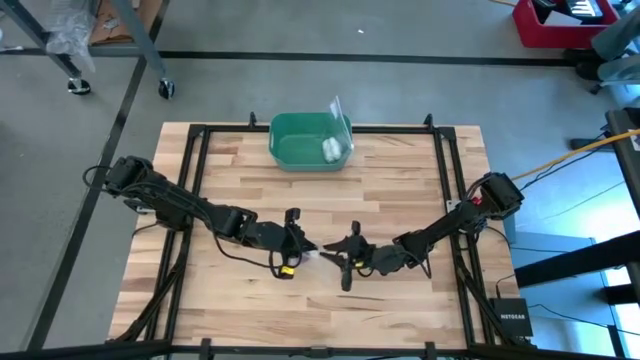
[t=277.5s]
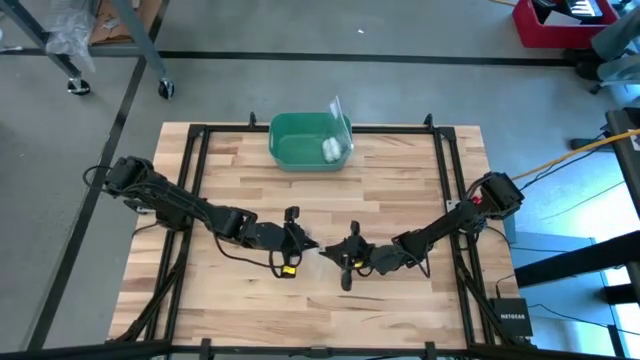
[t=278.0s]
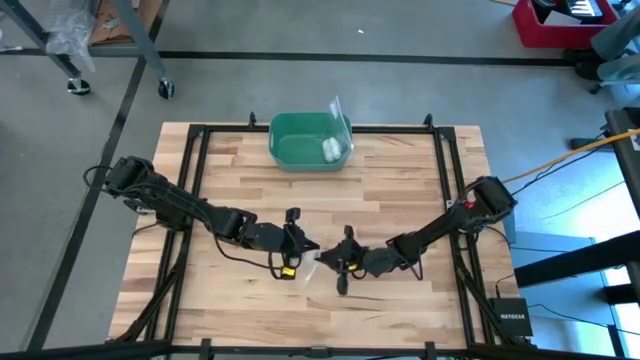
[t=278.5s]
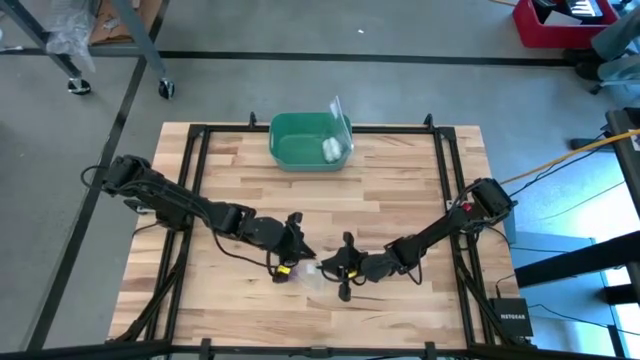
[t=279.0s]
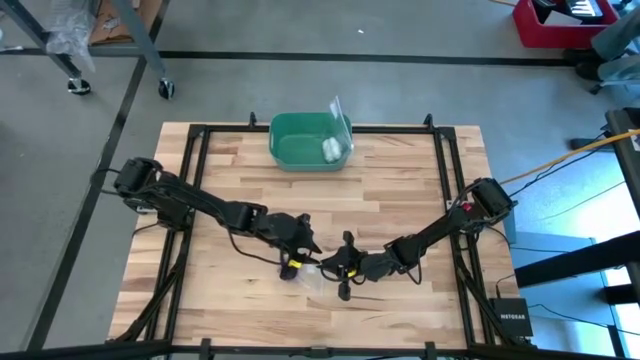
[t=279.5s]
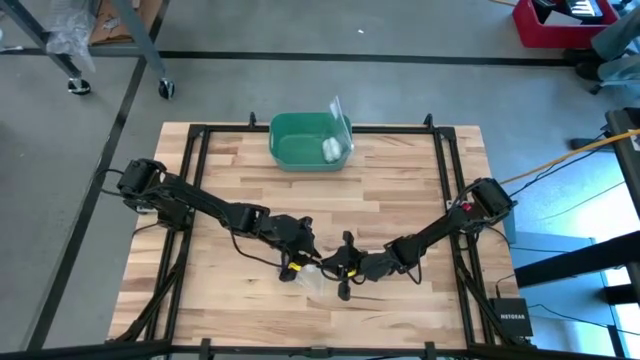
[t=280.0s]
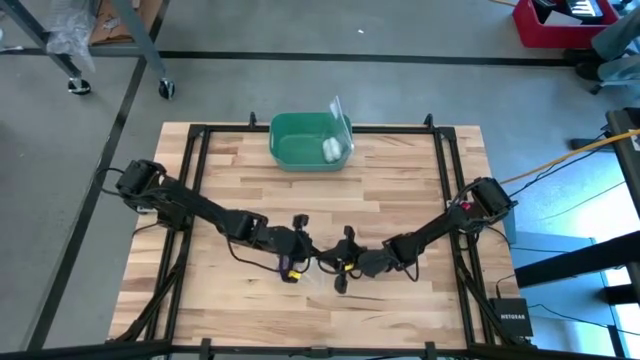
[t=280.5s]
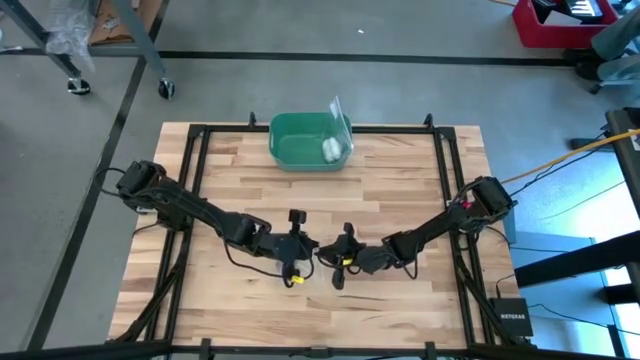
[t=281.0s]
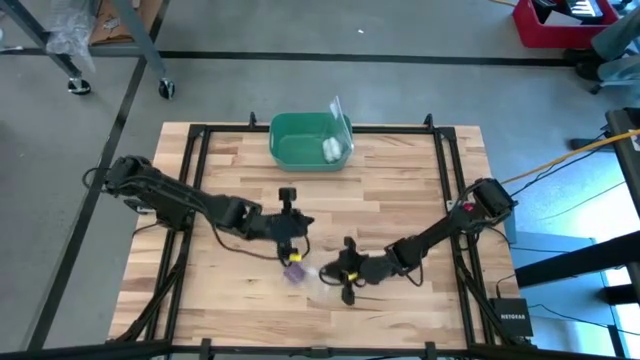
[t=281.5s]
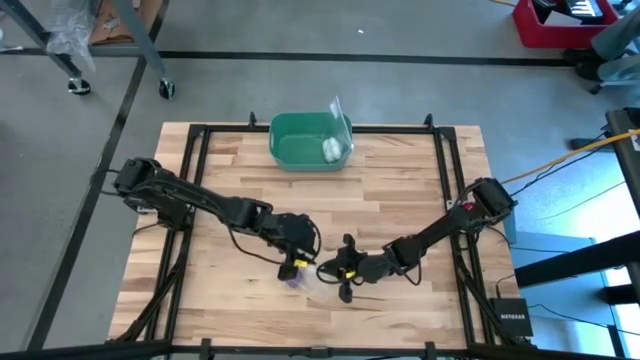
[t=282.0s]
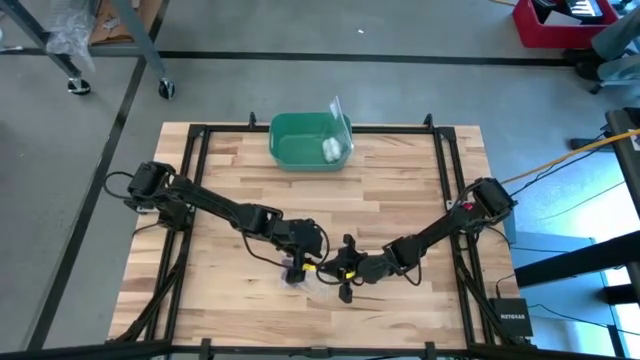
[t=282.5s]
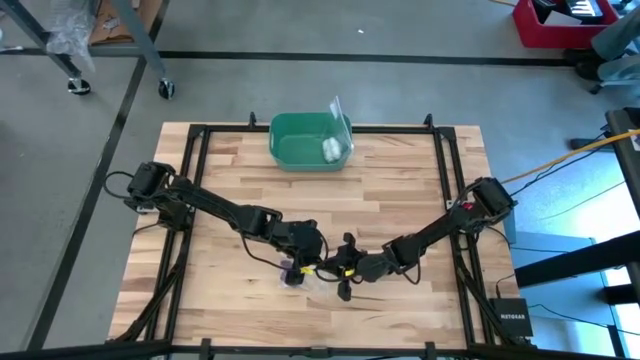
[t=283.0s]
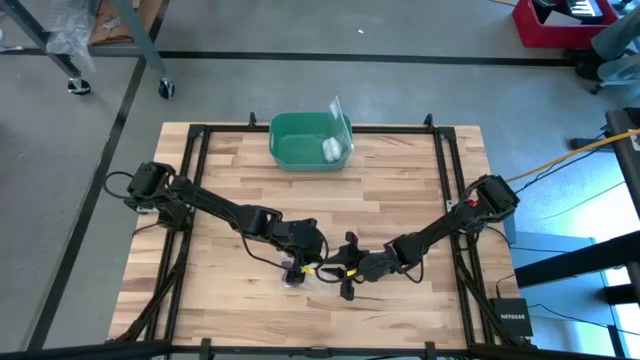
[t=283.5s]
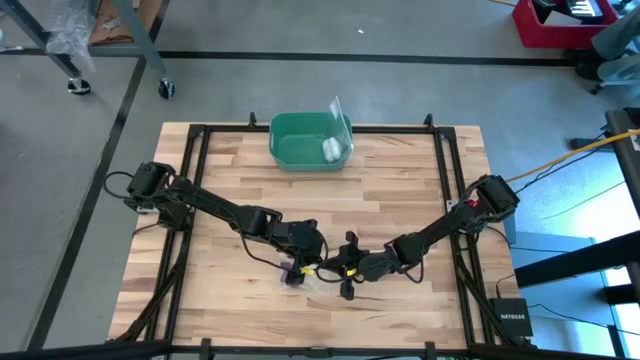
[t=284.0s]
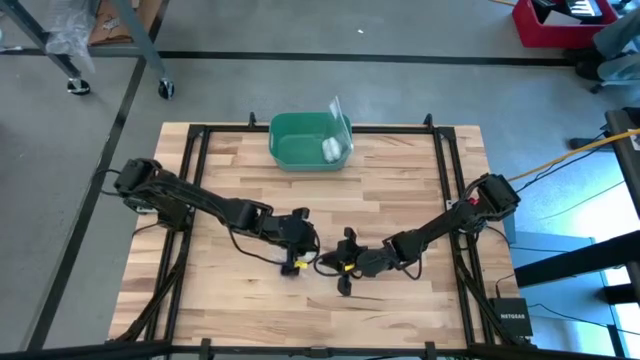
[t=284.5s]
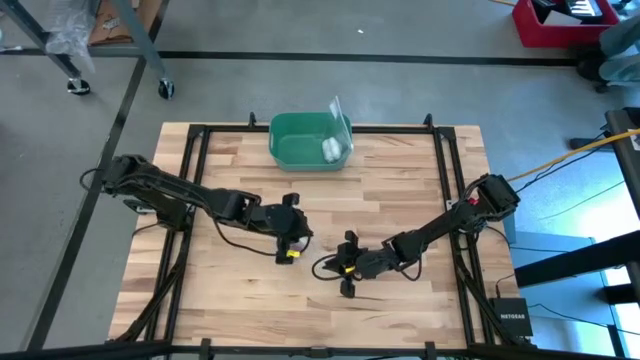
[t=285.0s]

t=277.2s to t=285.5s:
Task: Roll bandage
Close the zip bag

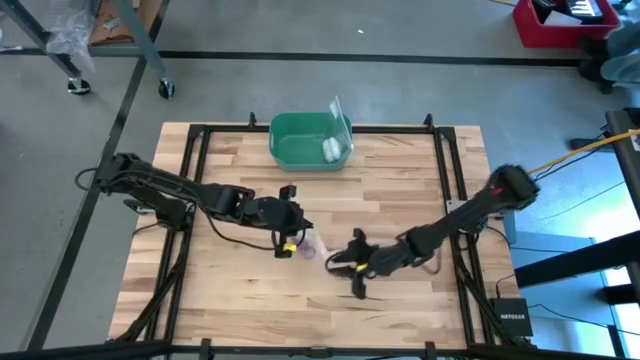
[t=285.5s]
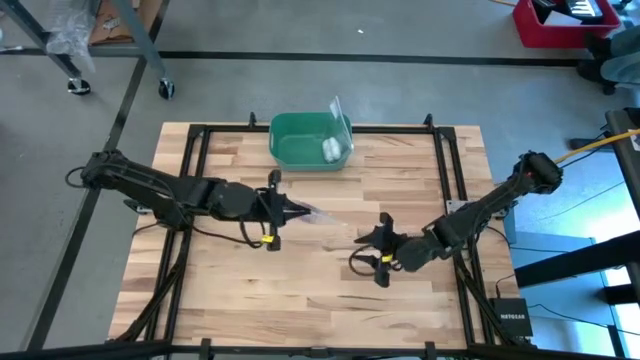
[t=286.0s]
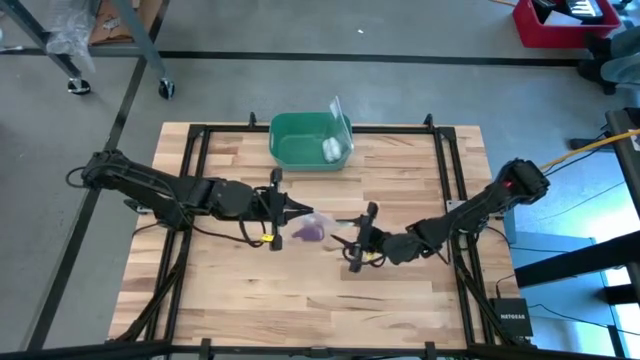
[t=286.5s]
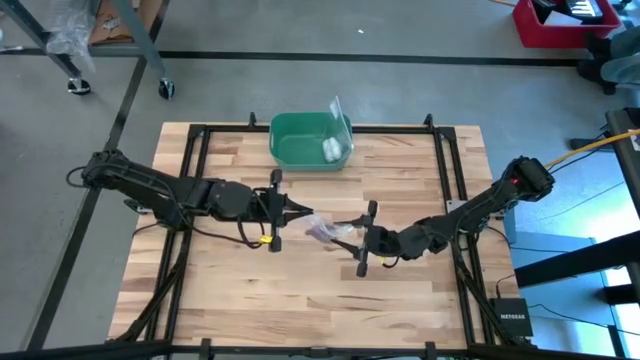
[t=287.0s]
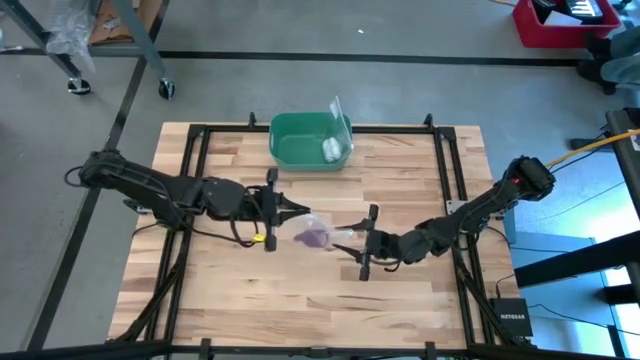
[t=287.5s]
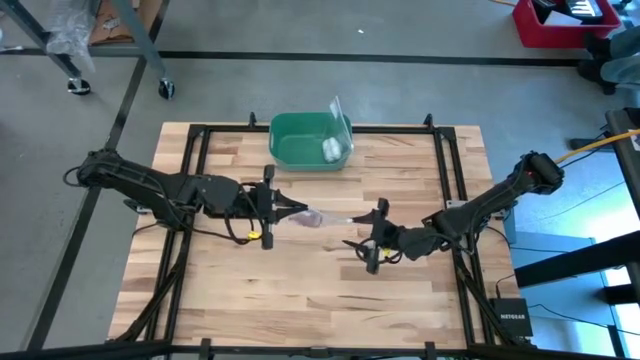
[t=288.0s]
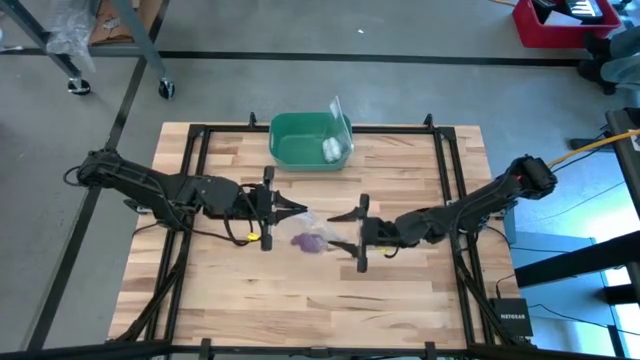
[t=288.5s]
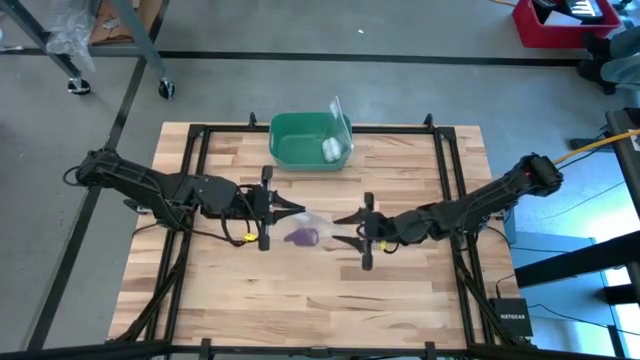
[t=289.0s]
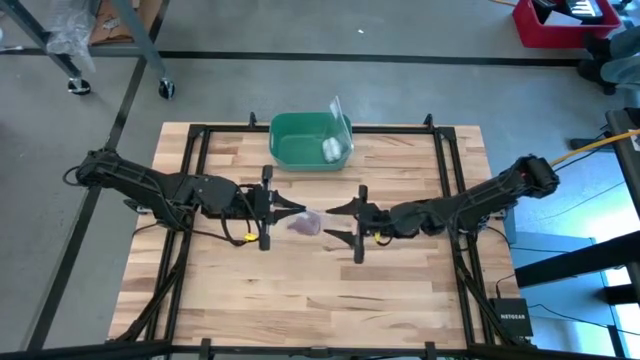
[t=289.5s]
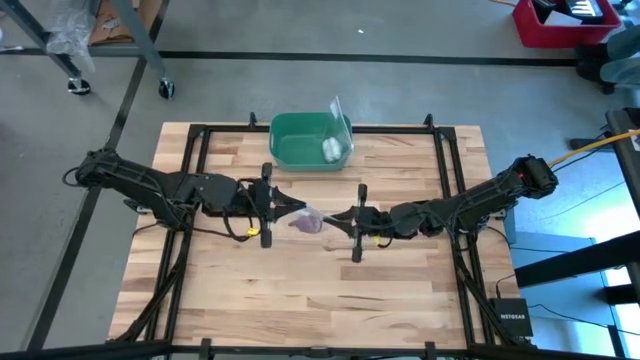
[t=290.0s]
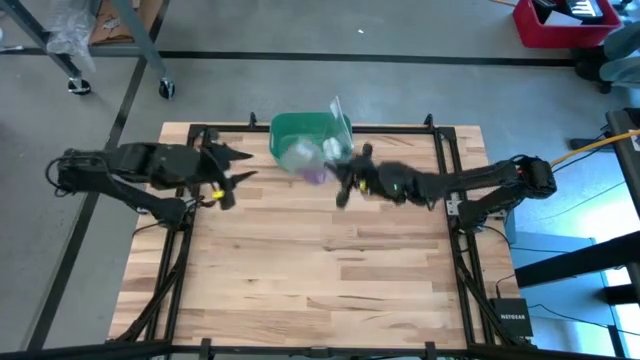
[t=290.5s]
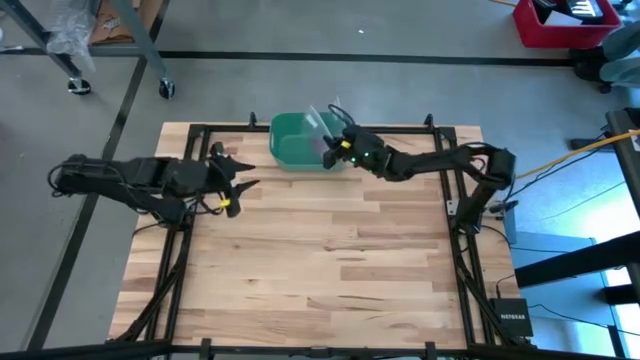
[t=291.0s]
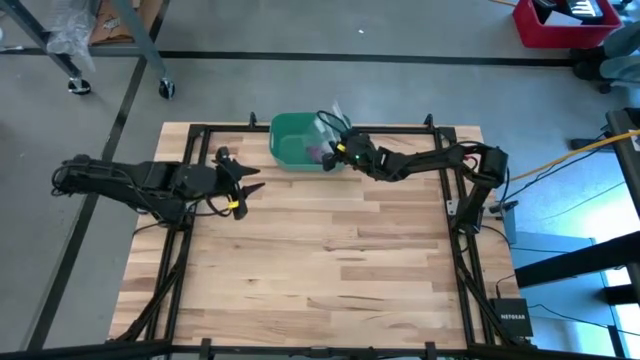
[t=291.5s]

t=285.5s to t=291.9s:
Put the zip bag into the green bin

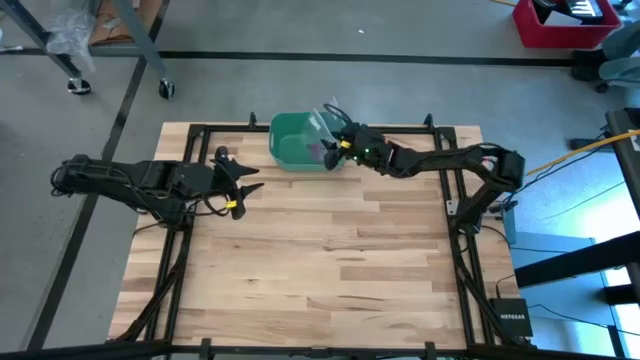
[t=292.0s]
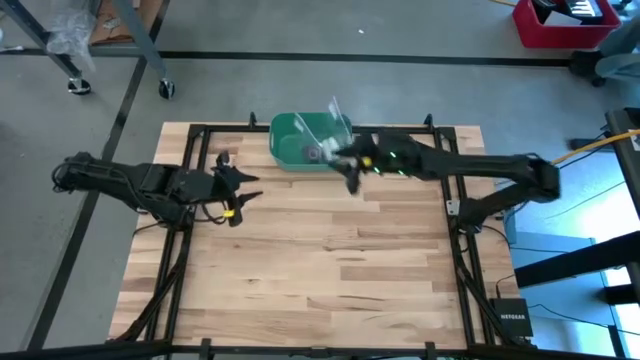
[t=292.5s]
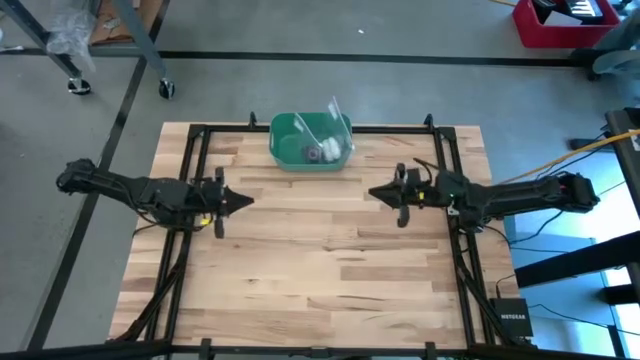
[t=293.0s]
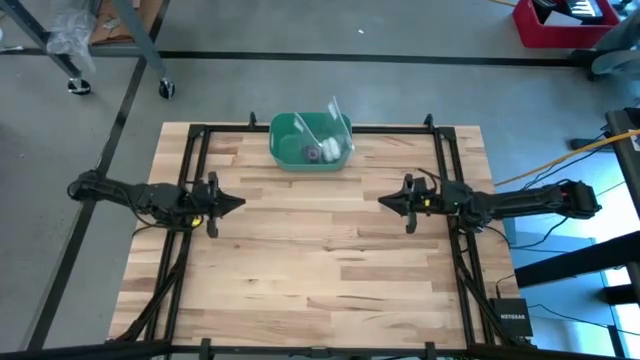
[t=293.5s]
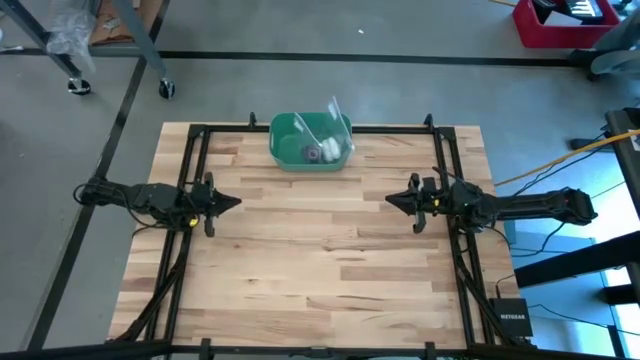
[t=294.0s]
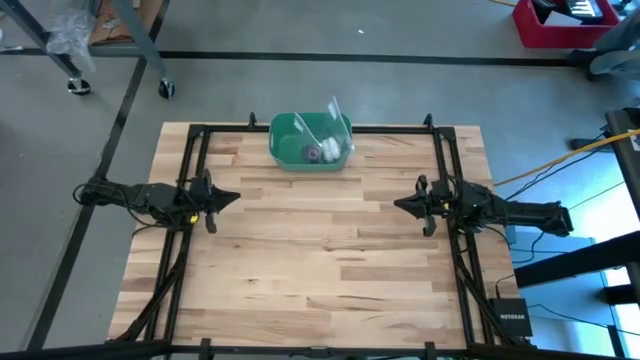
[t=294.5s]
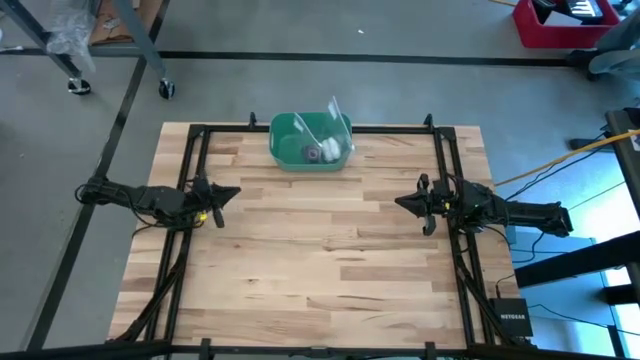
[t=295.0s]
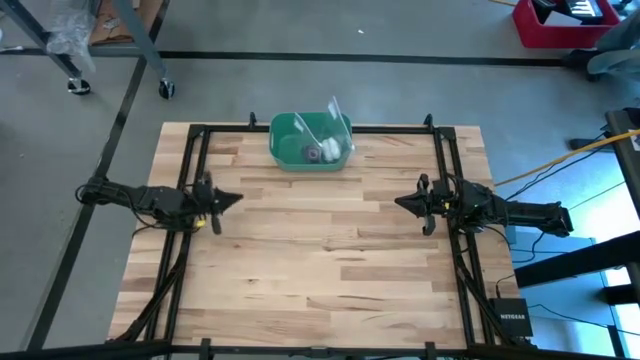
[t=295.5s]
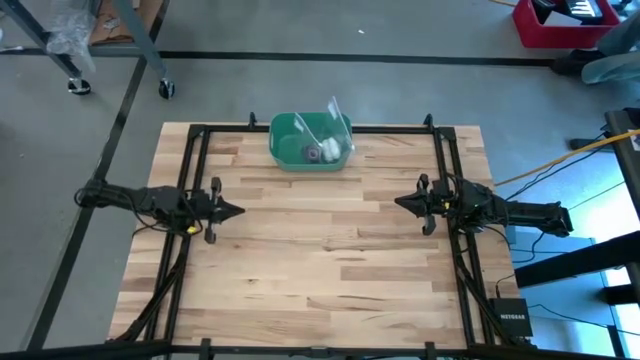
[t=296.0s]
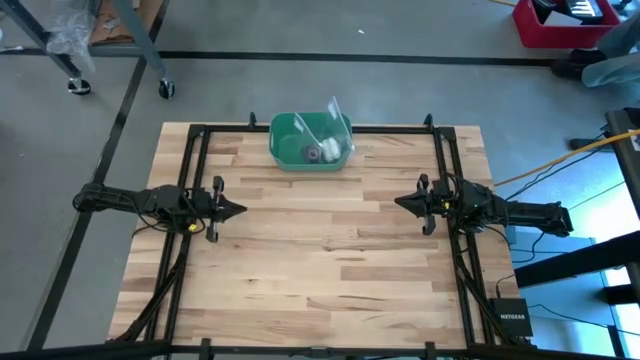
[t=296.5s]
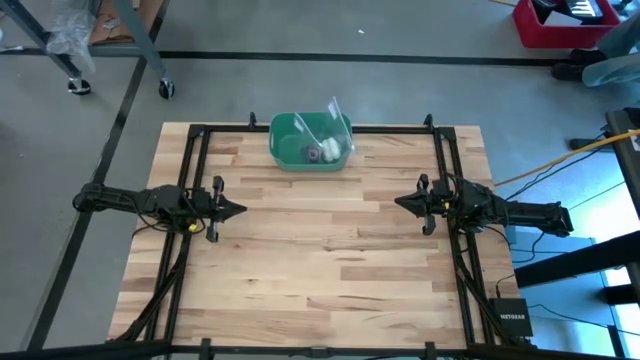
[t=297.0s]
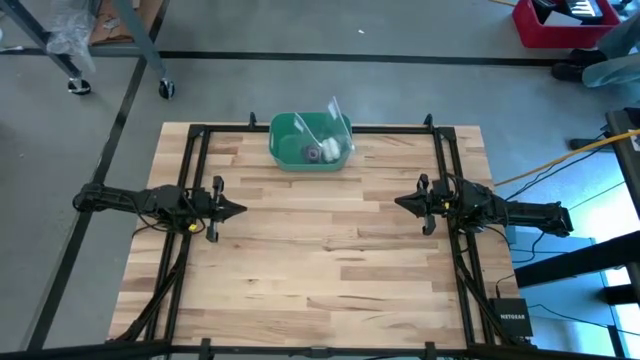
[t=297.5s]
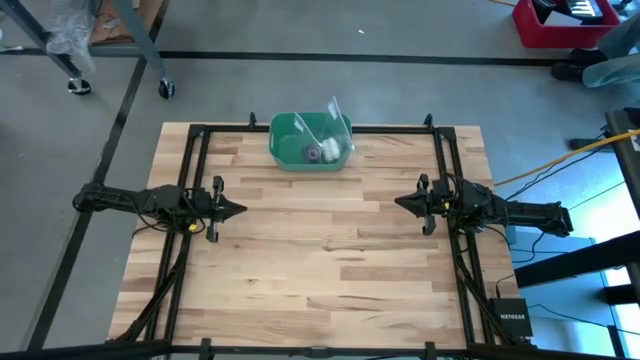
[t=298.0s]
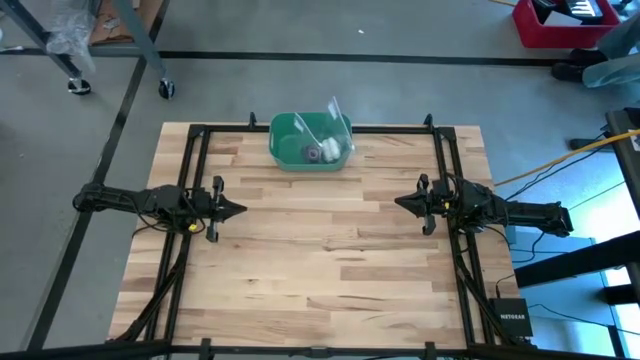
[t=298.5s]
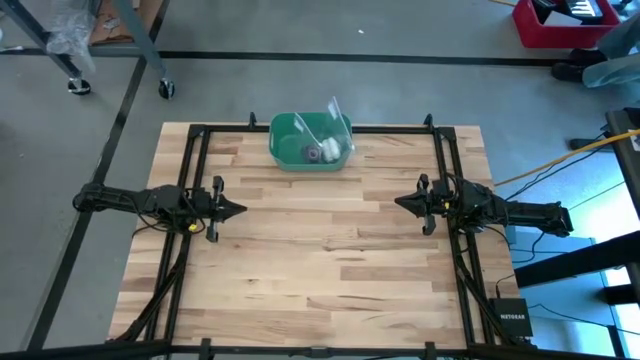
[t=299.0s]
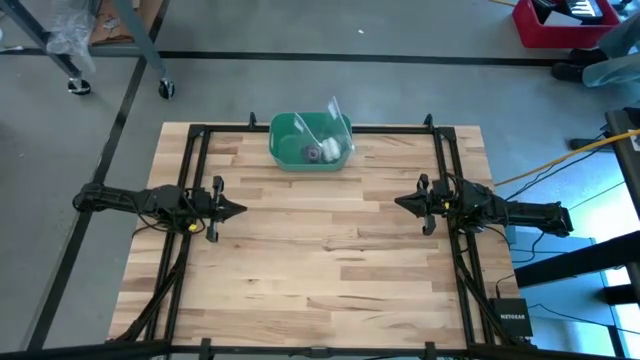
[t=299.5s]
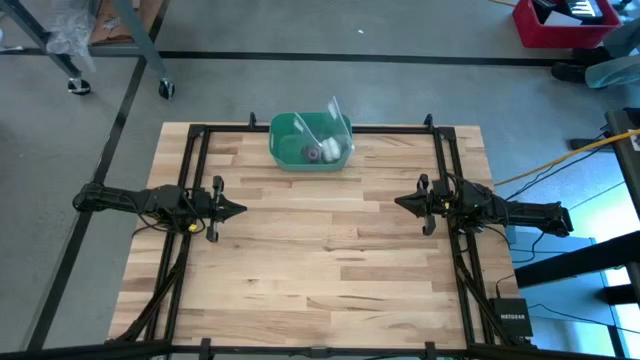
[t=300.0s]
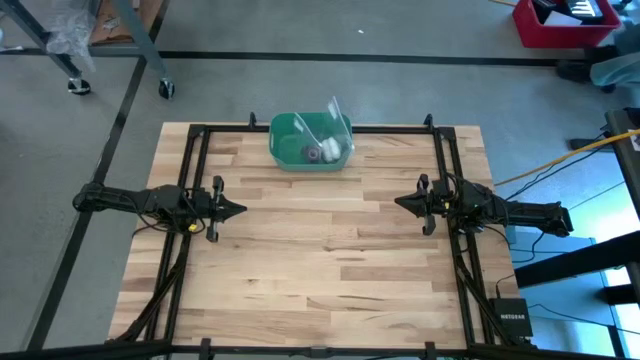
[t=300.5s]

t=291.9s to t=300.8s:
Return to Home Position
